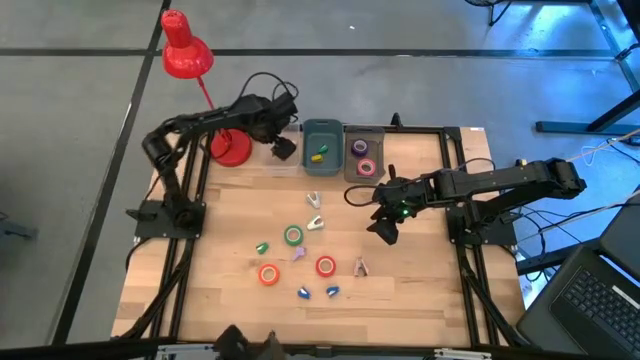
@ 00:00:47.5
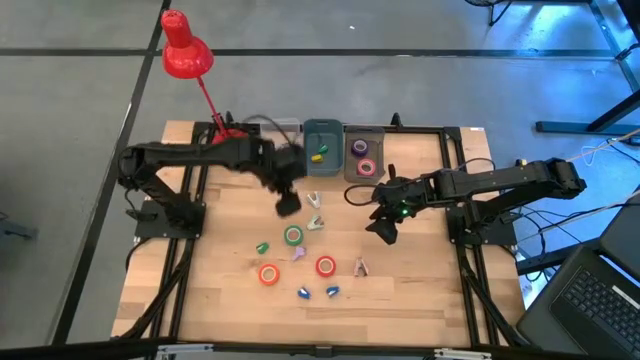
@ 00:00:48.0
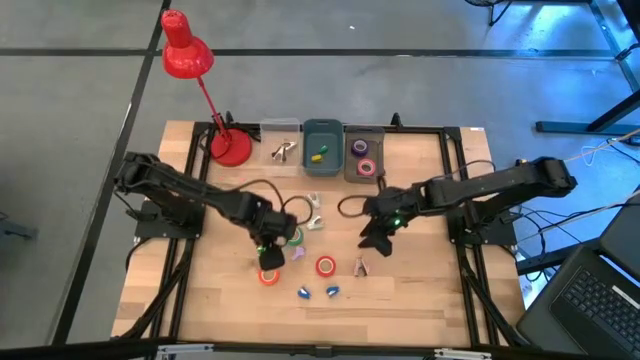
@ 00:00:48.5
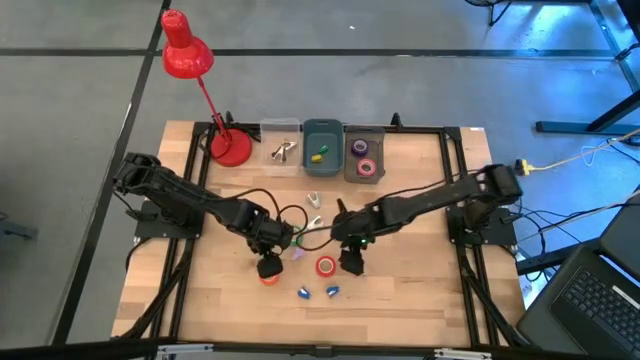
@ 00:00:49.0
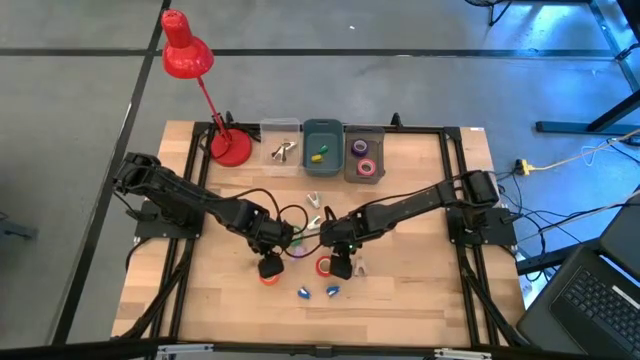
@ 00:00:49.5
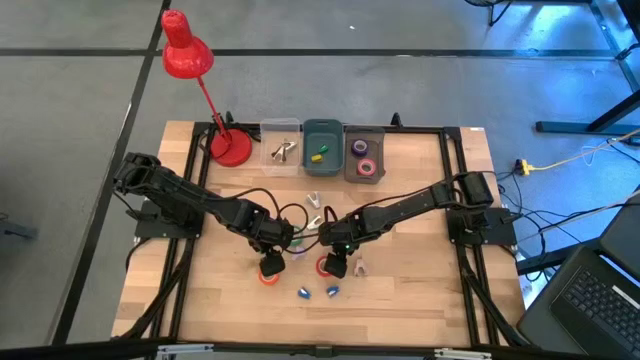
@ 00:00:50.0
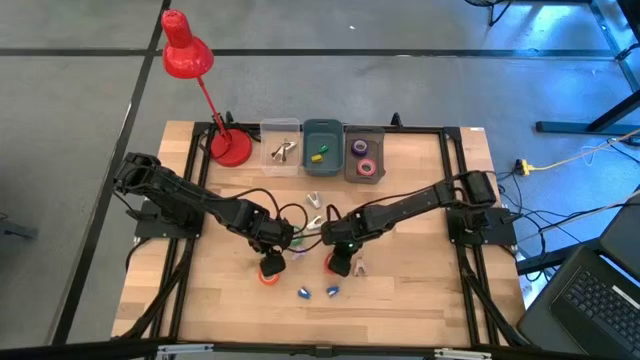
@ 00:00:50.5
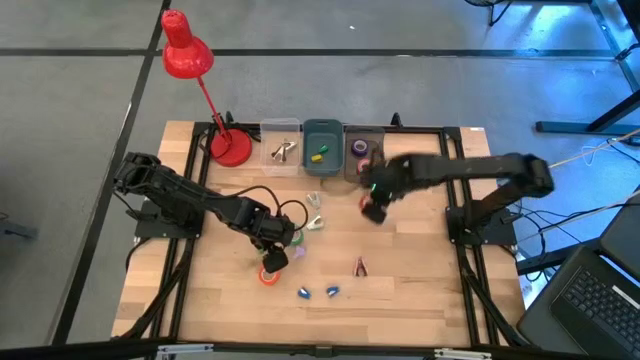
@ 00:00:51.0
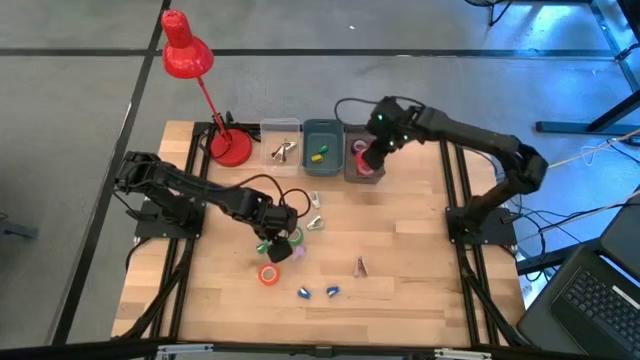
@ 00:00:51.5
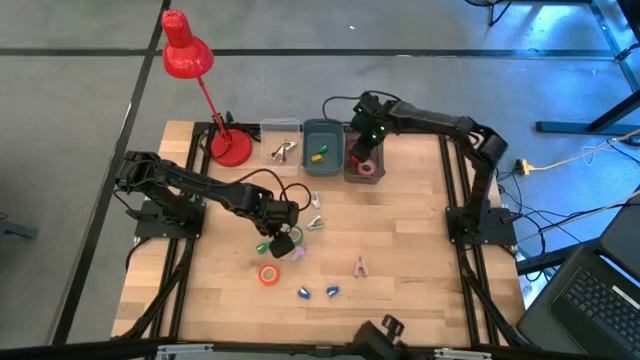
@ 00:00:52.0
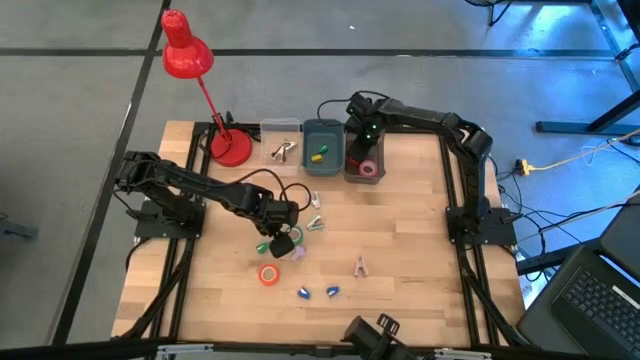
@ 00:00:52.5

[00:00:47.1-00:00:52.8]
Task: Pick and place Stapler, Stapler remover, tape
Put the red tape into the black bin

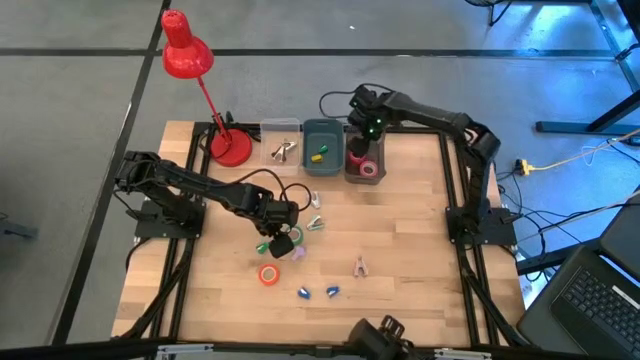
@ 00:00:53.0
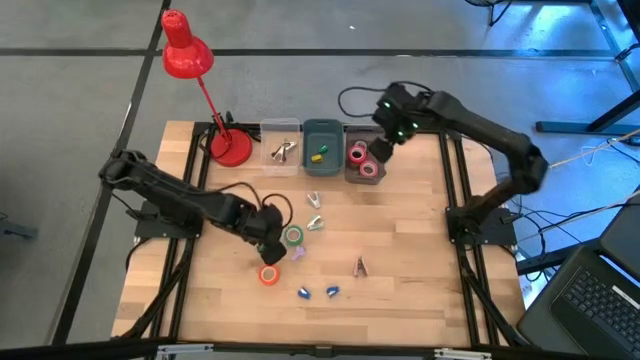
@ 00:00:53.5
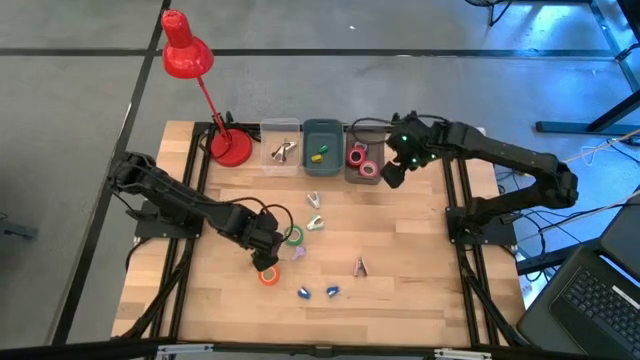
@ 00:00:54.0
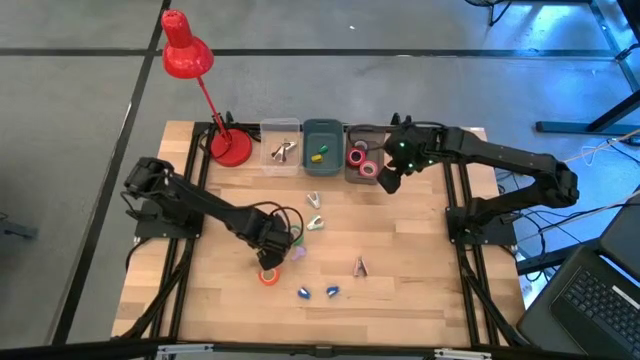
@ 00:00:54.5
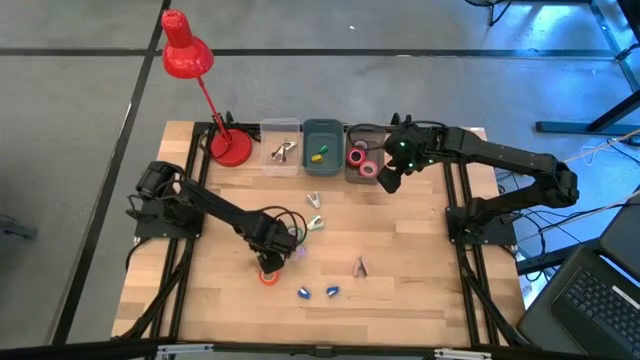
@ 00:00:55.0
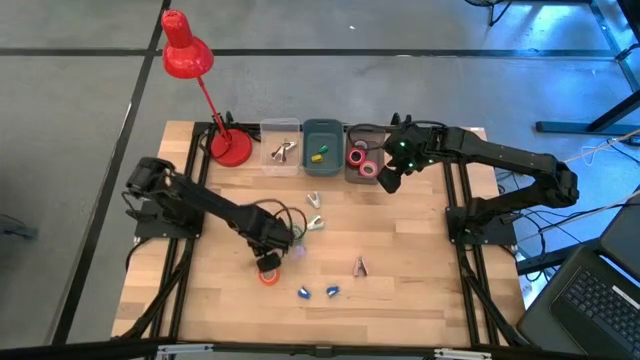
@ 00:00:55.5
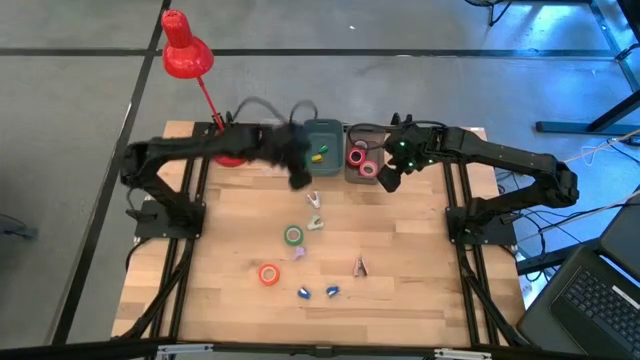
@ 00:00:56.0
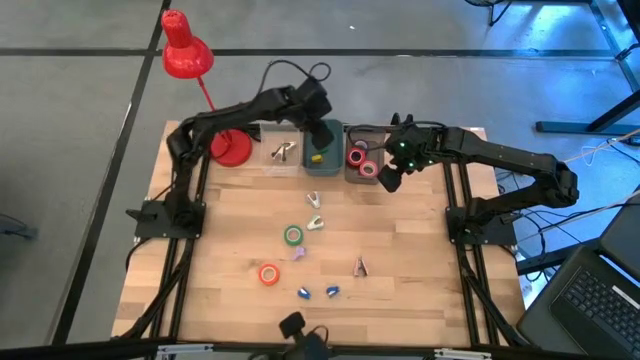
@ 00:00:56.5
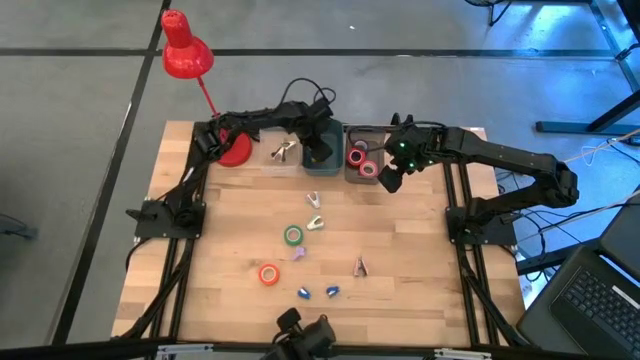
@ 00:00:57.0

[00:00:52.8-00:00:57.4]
Put the green stapler into the blue bin

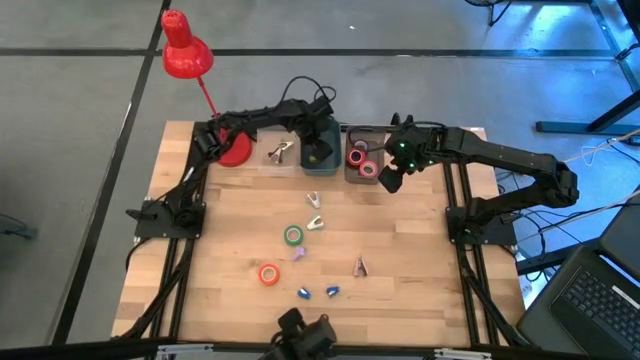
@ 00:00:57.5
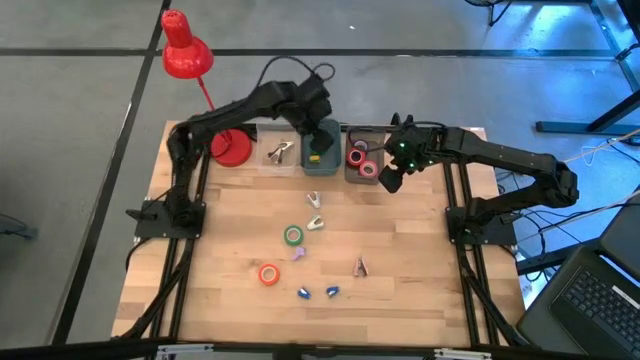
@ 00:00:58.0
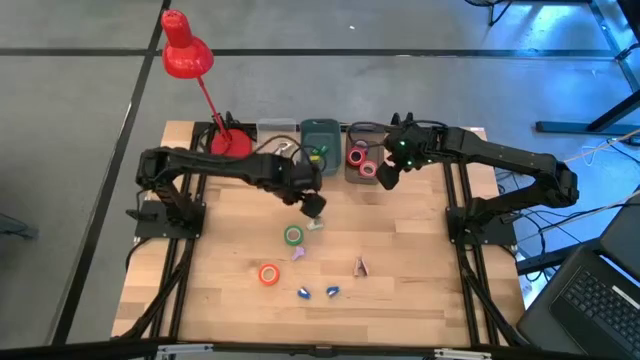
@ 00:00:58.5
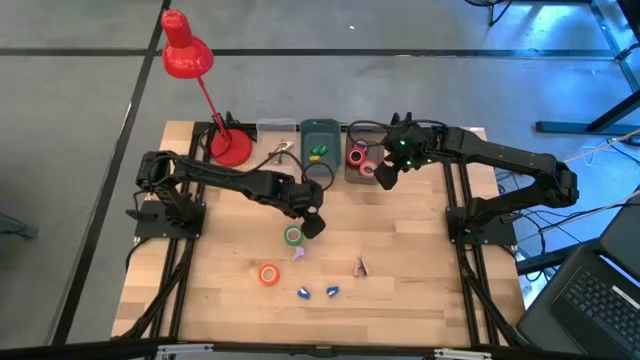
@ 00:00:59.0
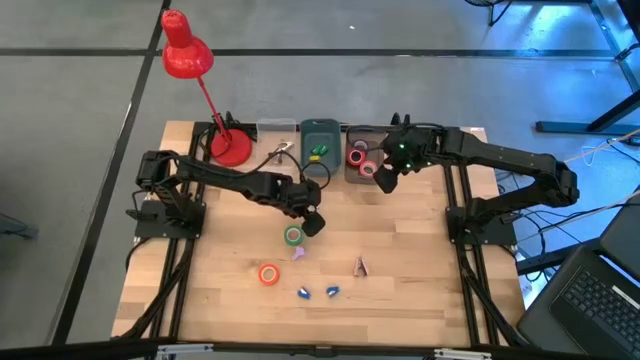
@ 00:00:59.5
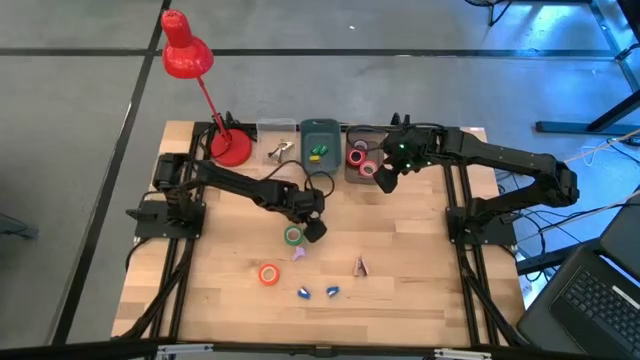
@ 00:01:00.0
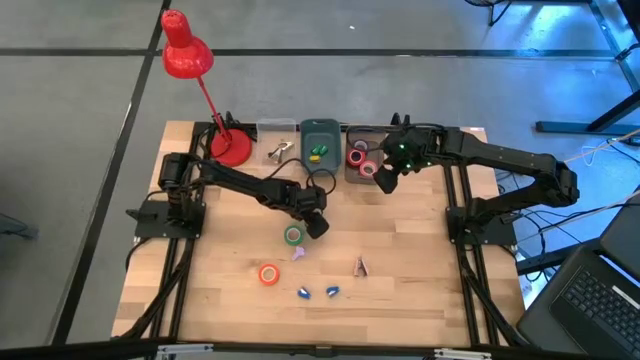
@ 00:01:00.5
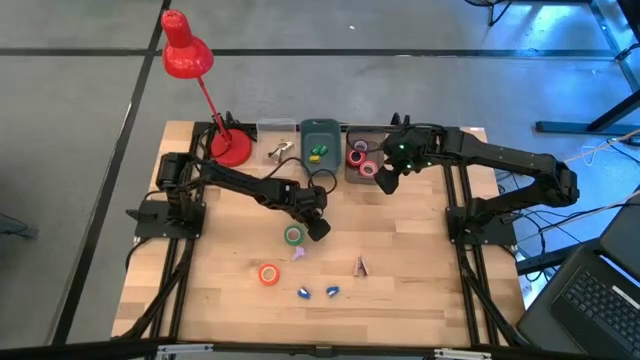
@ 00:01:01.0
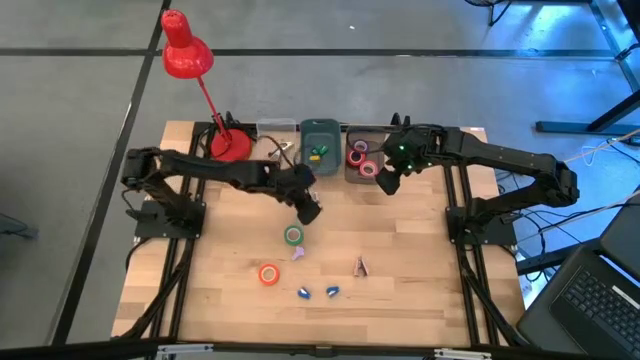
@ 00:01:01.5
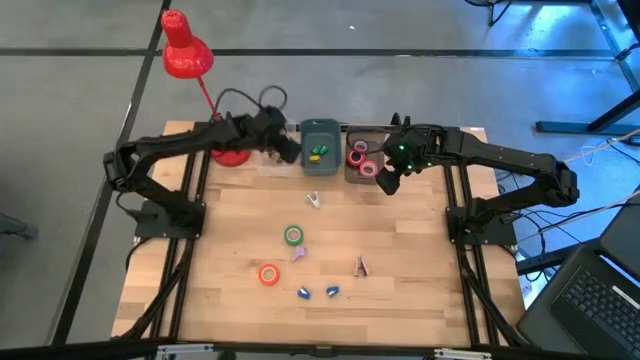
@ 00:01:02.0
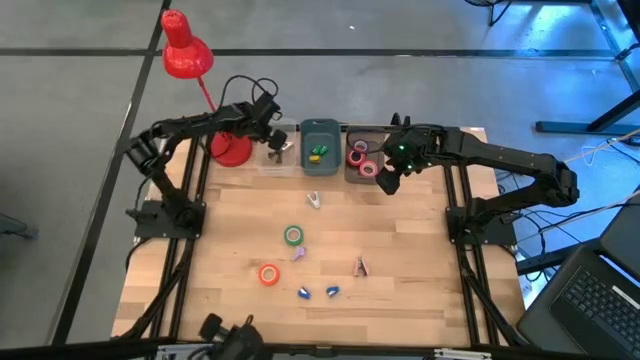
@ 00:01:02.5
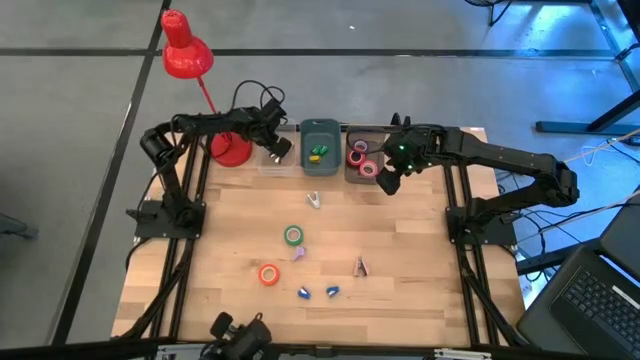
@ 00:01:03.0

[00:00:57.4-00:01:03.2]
Put the bottom light blue staple remover into the transparent bin

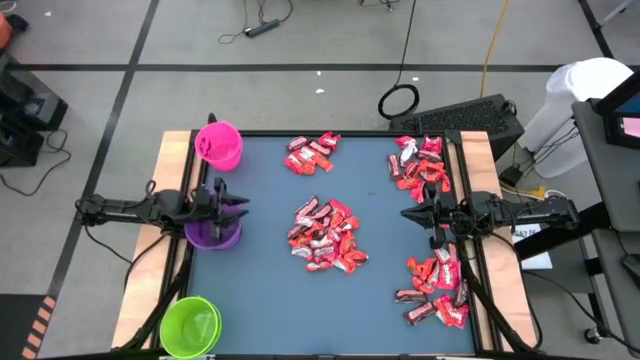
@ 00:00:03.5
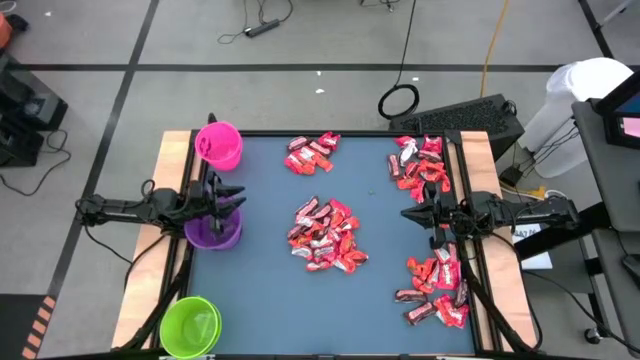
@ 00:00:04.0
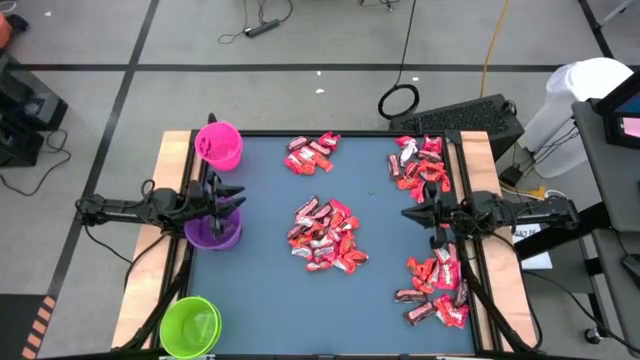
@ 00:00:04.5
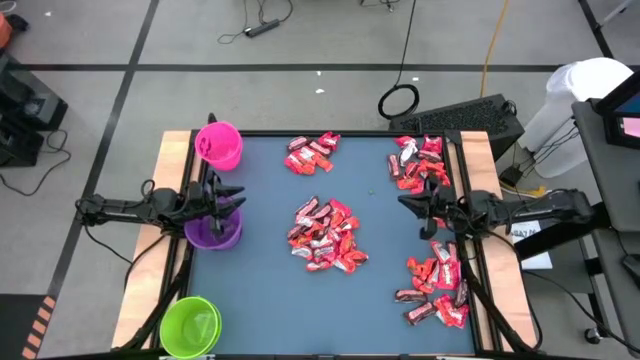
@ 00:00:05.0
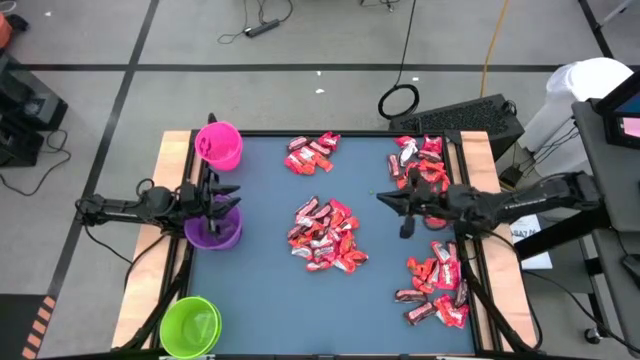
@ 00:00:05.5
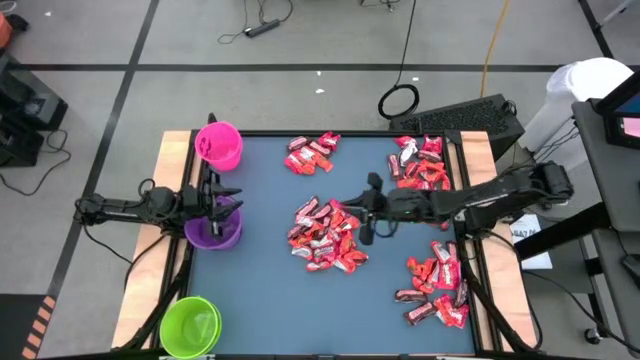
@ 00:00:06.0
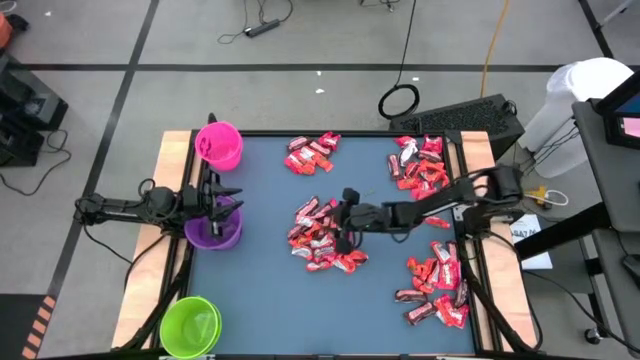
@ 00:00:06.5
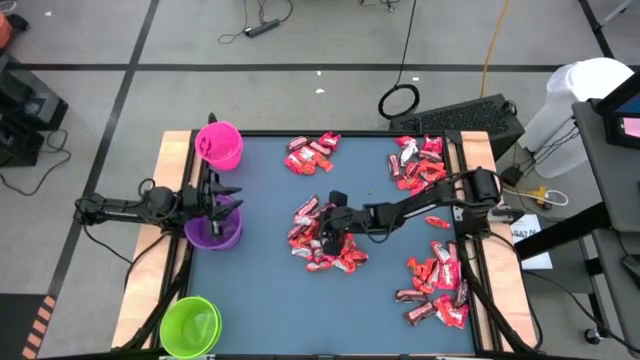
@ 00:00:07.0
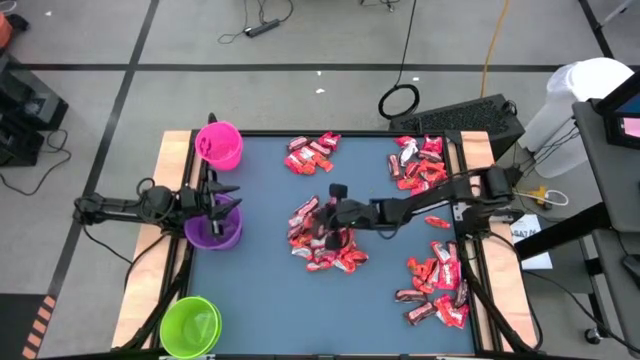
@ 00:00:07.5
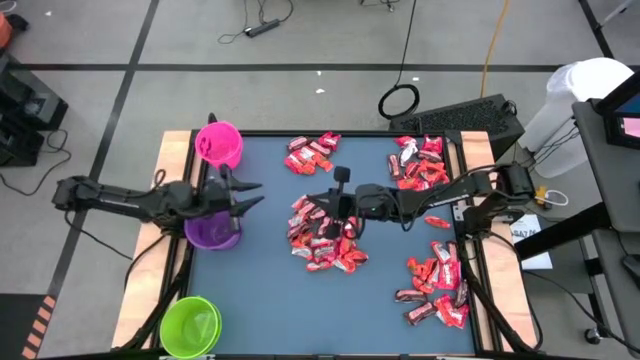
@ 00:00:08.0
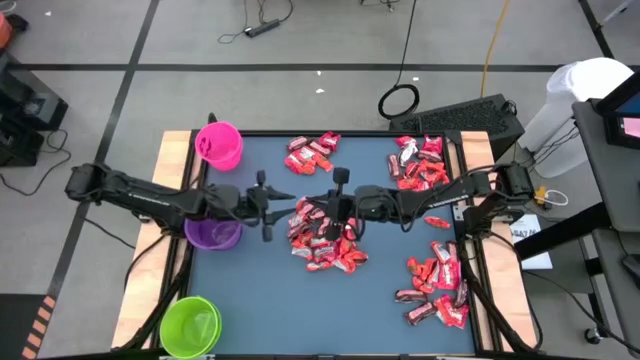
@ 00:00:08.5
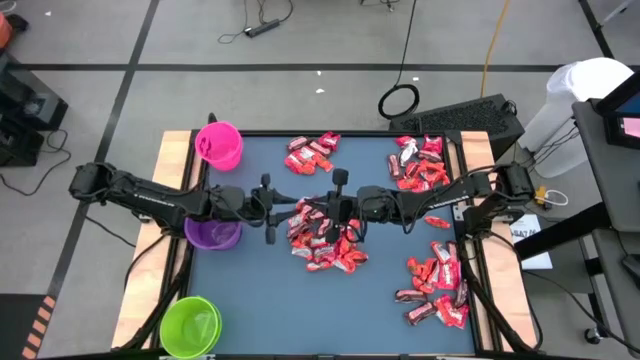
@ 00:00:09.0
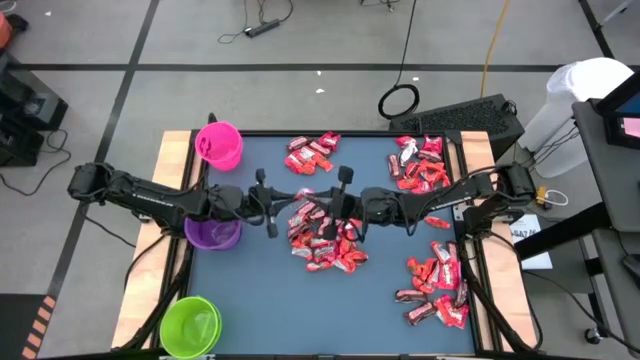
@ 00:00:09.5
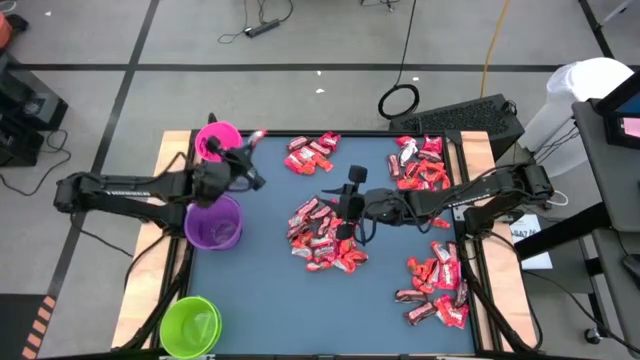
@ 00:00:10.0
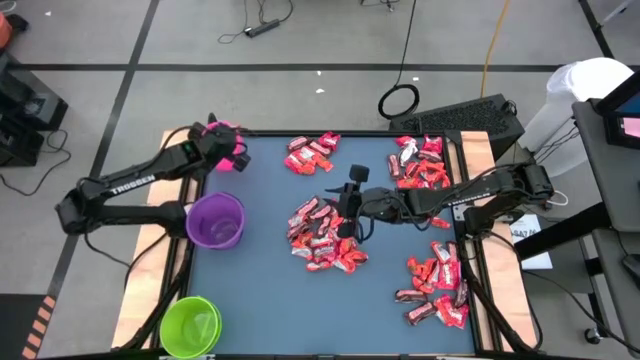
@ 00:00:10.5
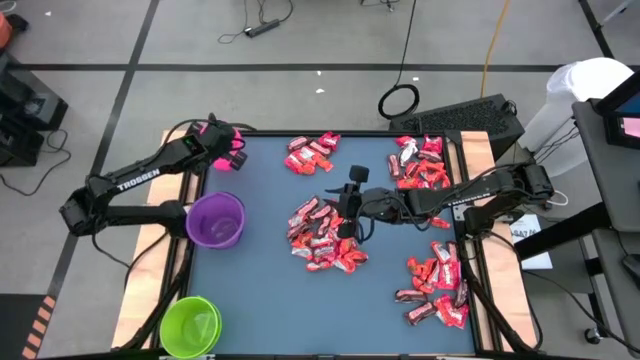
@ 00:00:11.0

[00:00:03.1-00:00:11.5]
Task: Organize candy in baskets
Put the orange chocolate into the pink bucket
